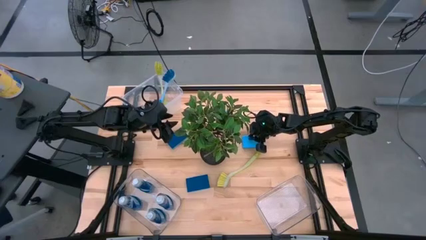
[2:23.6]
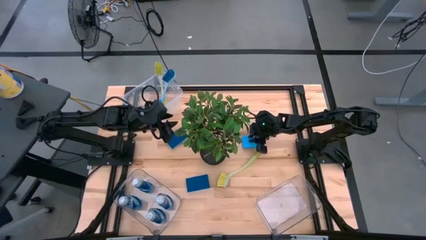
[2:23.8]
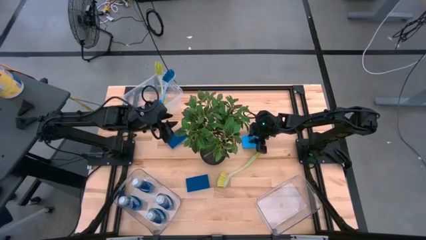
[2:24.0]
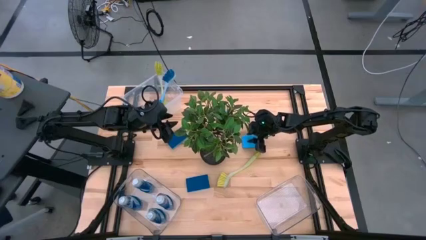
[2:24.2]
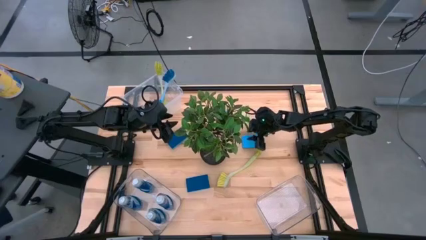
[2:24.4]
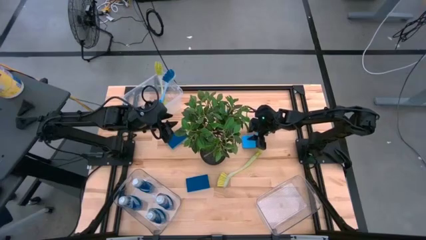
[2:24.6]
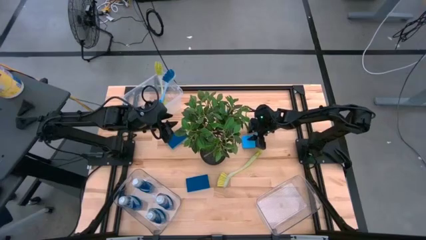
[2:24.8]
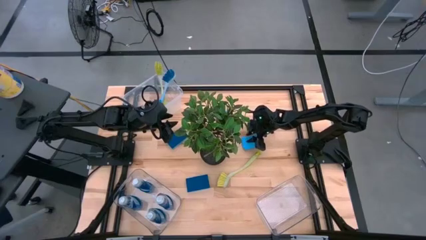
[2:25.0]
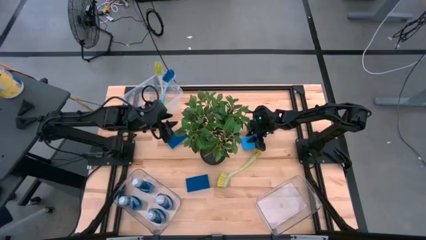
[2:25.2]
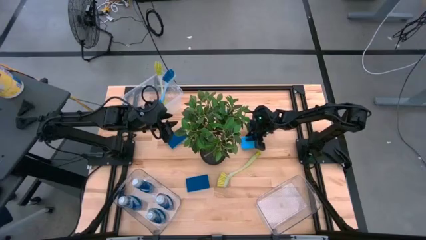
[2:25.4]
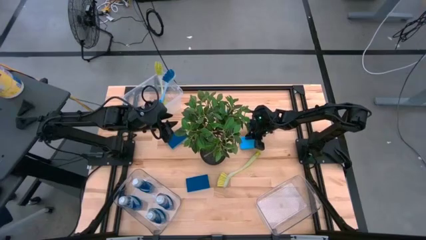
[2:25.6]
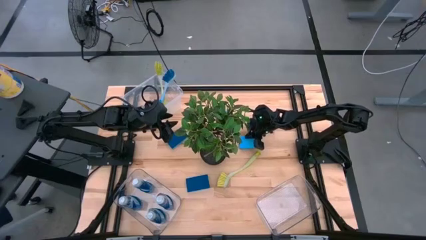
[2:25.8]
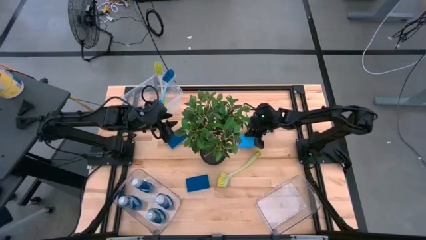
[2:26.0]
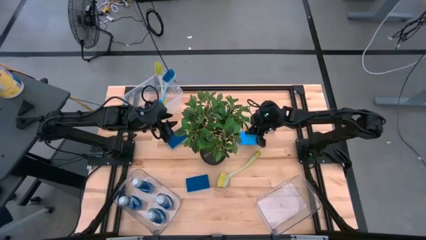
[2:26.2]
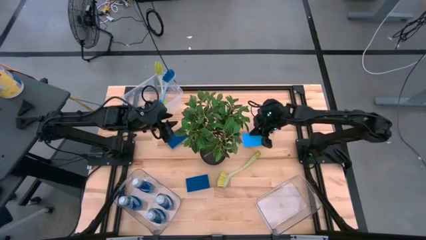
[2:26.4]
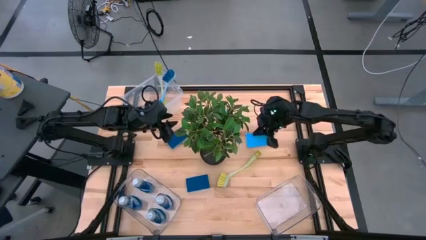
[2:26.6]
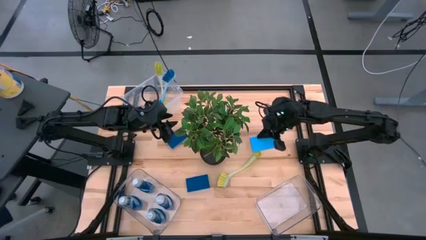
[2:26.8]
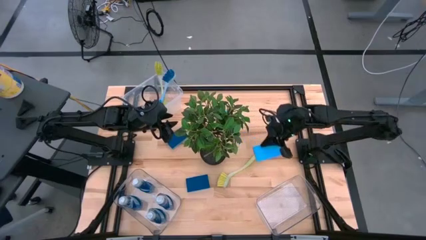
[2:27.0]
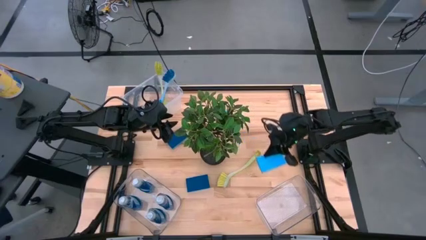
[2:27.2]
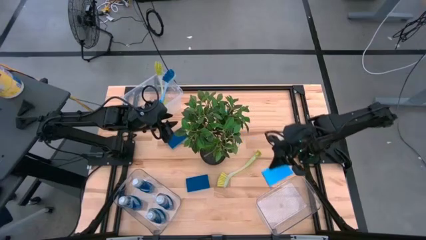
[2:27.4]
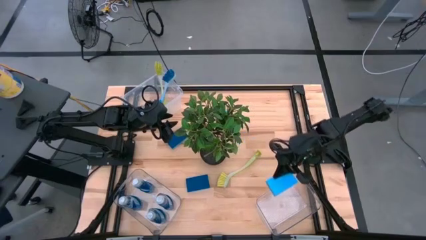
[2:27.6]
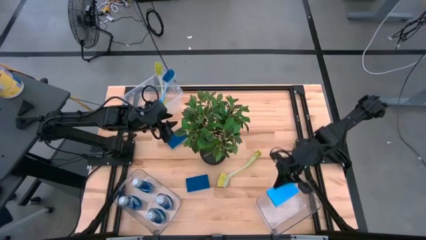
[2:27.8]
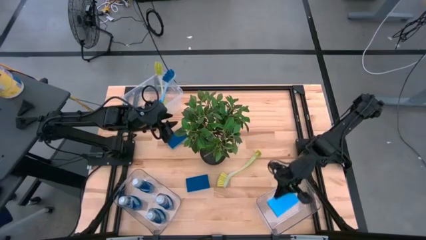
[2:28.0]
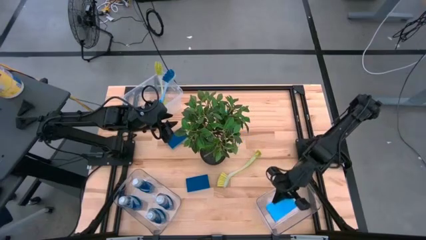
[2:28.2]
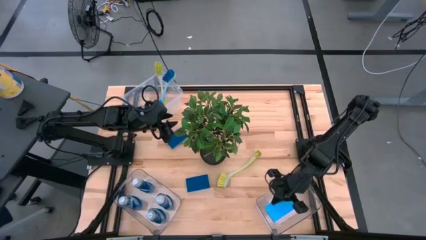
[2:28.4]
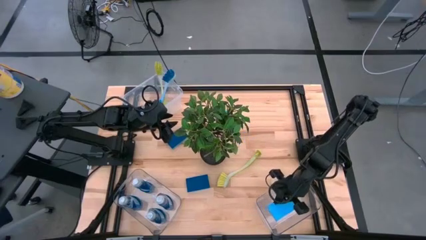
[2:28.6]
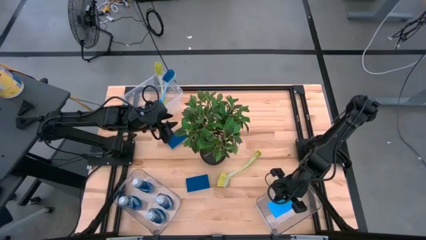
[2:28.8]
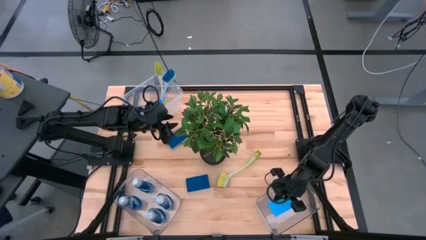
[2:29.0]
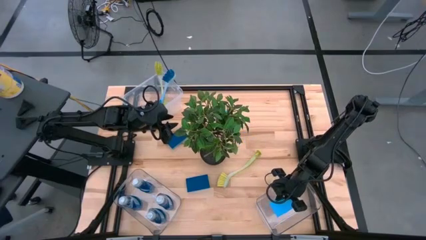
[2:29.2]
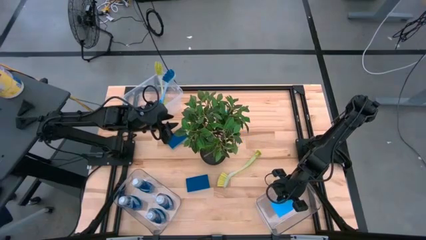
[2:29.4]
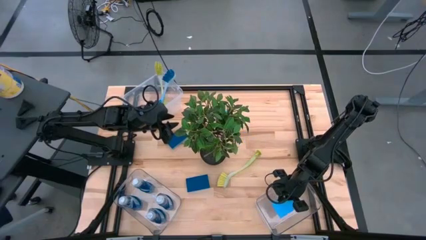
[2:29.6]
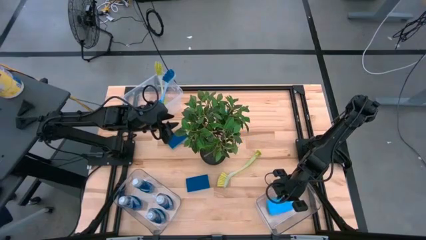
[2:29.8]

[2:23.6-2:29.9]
Task: Pick & Place Kitchen Sink Supplies
Put the blue sponge into the bottom right transparent bin

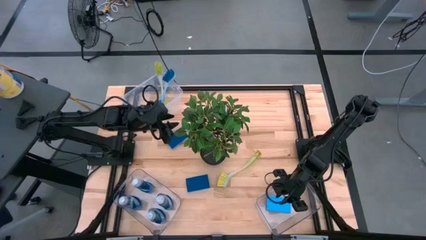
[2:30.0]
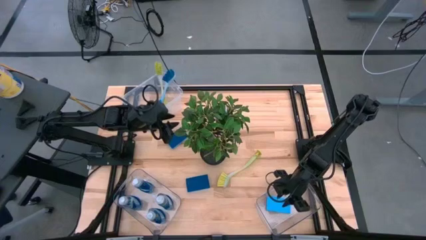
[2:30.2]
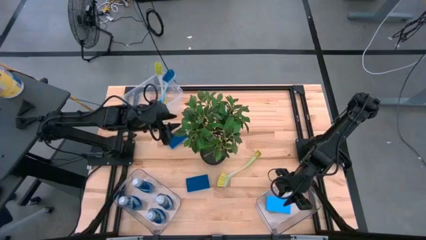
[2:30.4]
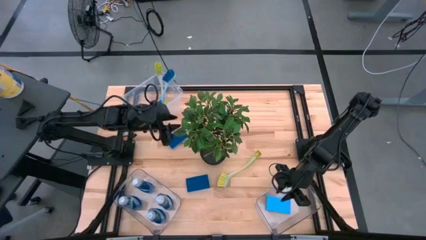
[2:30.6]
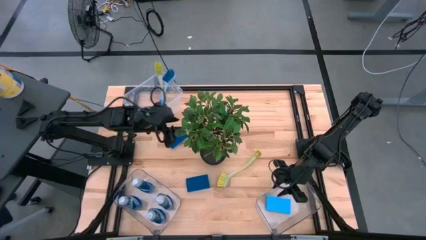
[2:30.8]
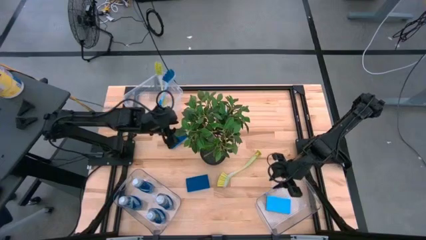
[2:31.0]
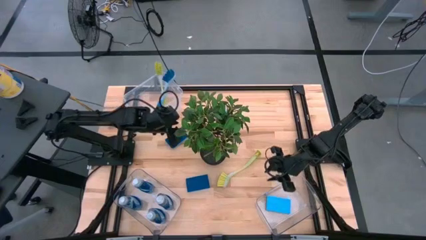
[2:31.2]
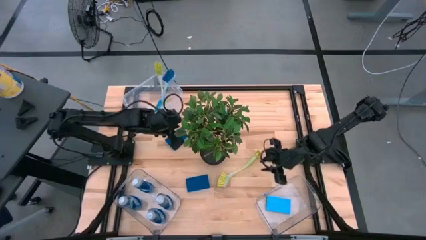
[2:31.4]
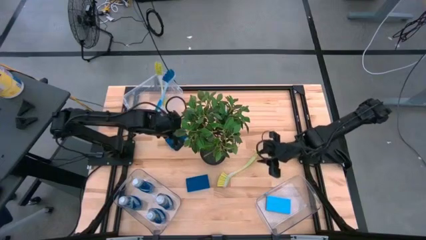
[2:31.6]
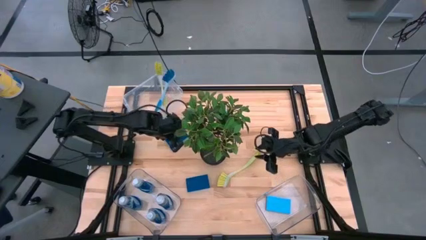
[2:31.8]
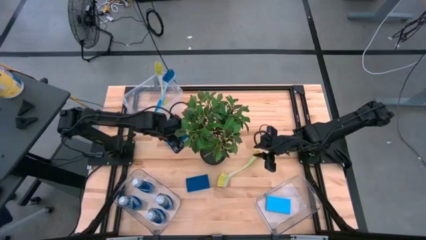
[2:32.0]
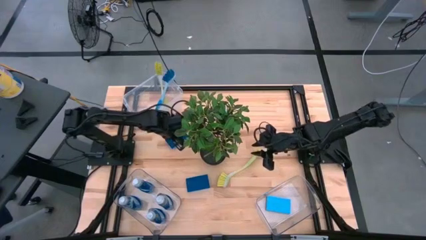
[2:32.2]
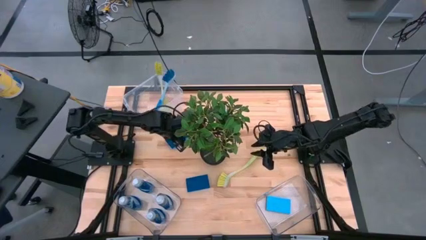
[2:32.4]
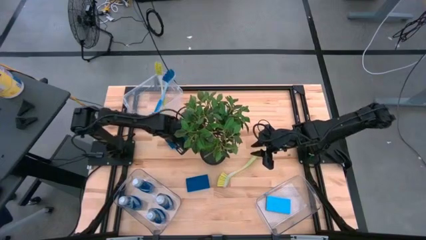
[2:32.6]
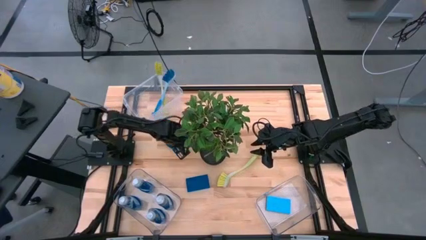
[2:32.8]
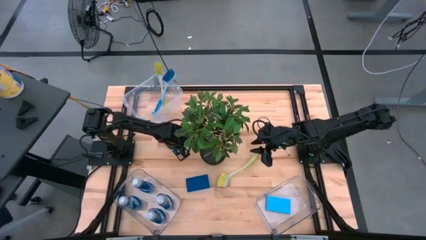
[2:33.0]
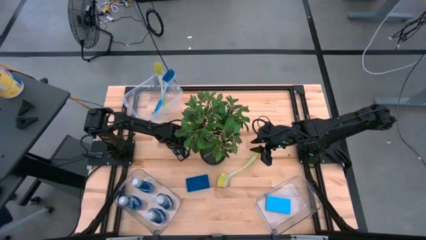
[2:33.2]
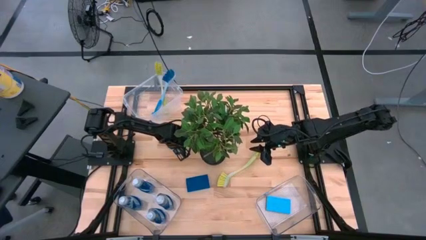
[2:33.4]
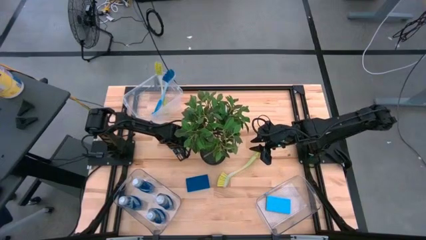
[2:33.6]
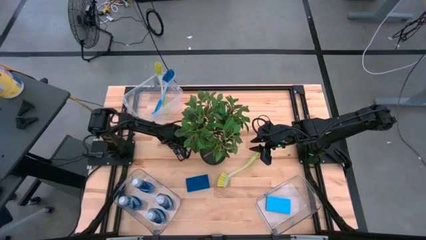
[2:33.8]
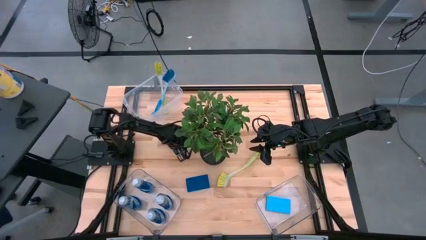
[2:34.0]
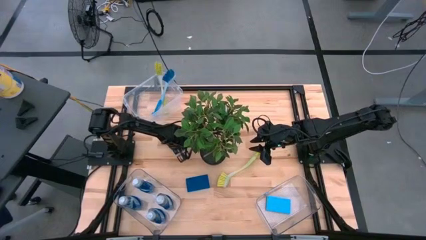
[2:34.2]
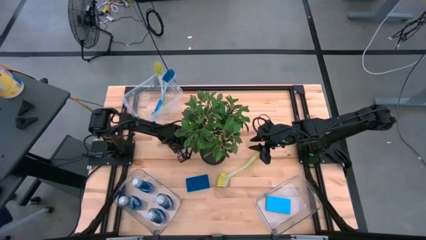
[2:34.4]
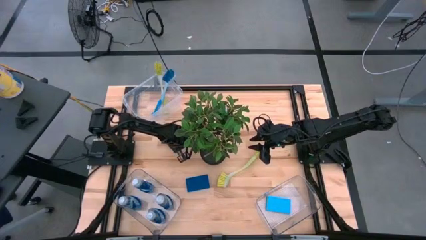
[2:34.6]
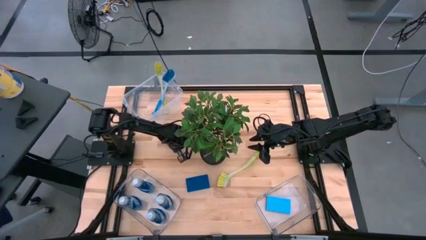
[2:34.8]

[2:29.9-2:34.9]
Put the blue sponge into the bottom right transparent bin

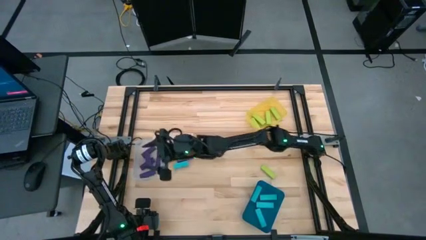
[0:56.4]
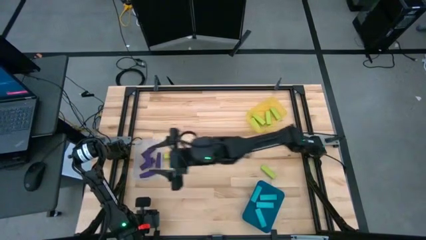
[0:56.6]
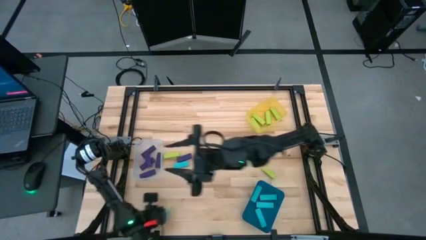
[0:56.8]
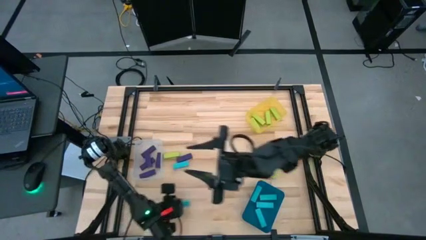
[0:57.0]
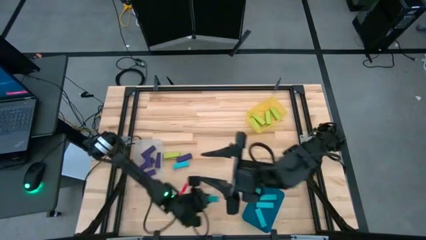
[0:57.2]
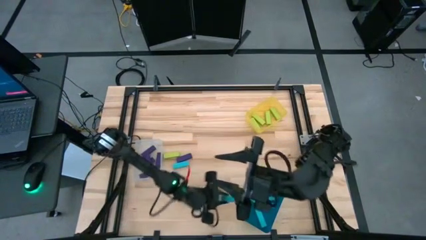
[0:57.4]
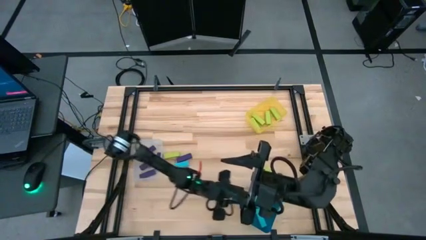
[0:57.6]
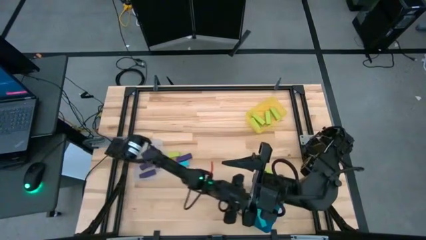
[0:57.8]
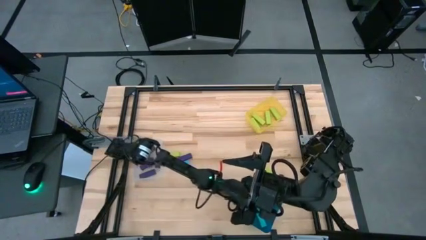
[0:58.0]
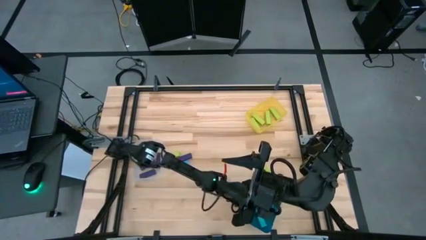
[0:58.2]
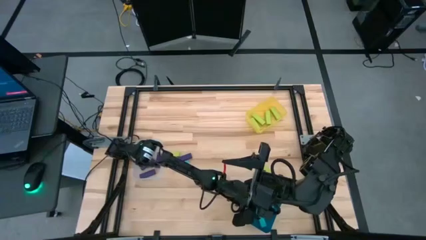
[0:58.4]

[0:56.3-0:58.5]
Task: Sort blocks
Put the light blue block into the blue bin

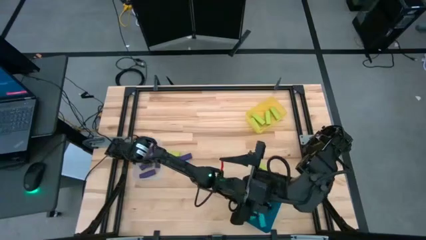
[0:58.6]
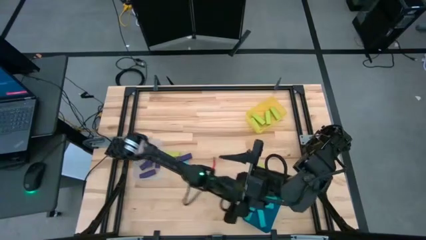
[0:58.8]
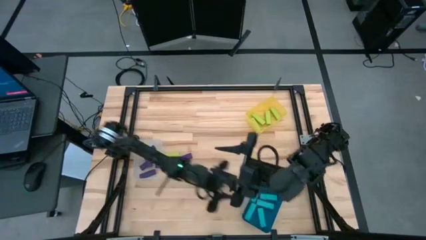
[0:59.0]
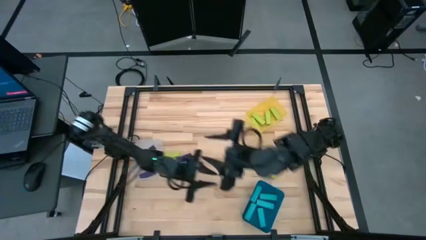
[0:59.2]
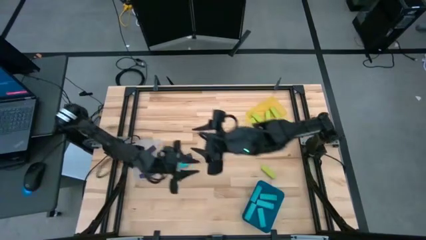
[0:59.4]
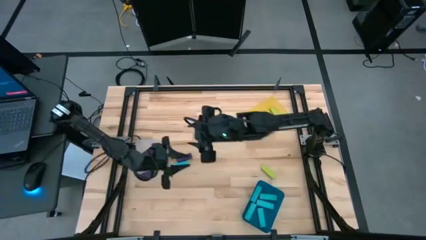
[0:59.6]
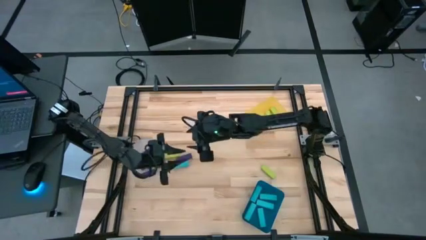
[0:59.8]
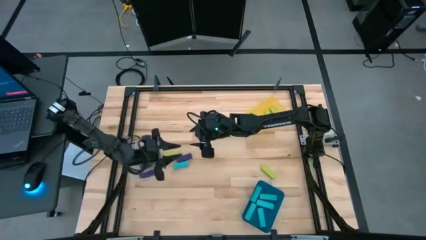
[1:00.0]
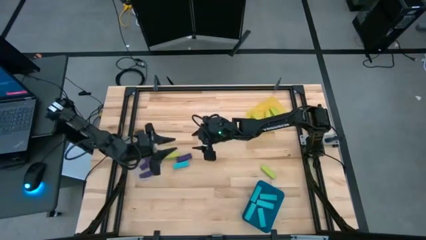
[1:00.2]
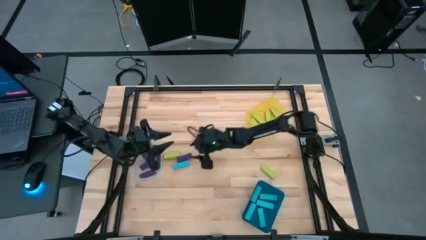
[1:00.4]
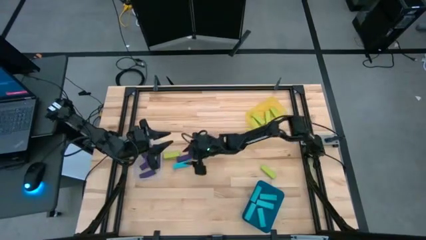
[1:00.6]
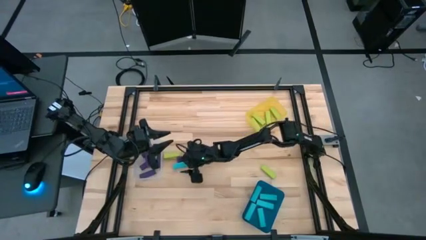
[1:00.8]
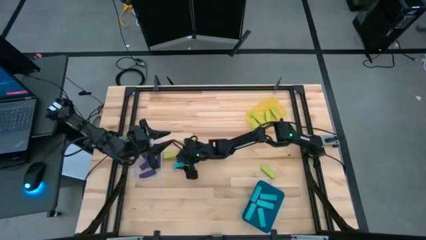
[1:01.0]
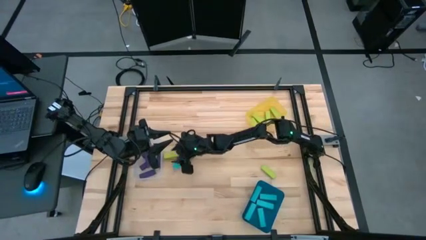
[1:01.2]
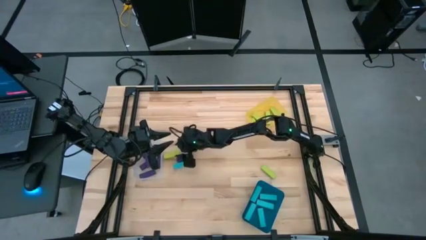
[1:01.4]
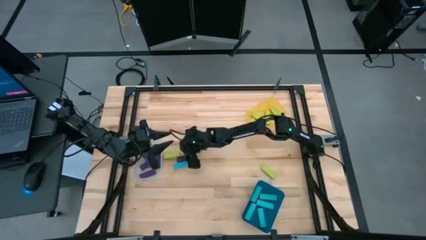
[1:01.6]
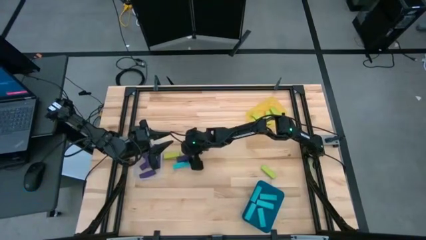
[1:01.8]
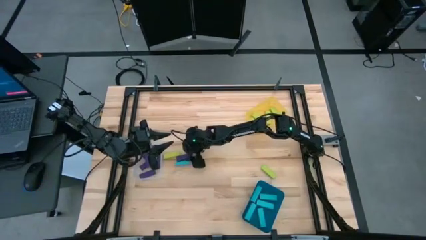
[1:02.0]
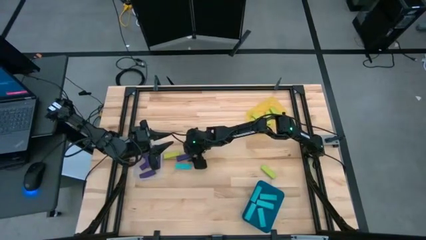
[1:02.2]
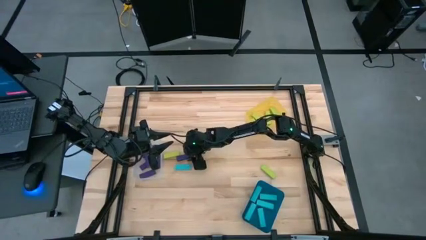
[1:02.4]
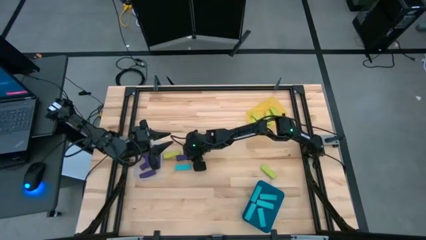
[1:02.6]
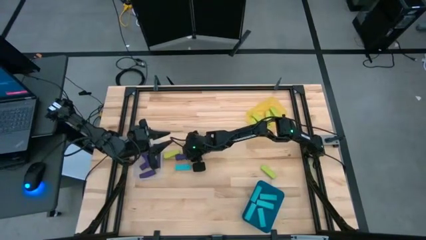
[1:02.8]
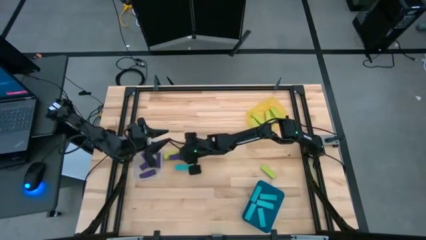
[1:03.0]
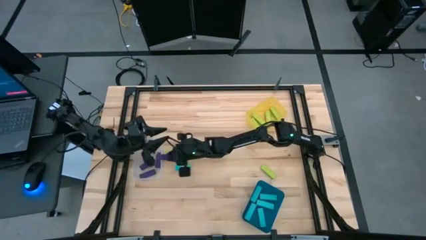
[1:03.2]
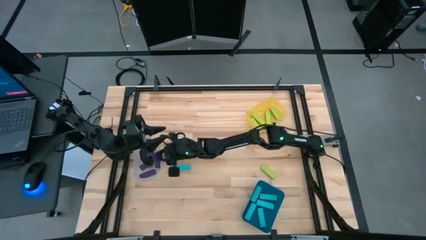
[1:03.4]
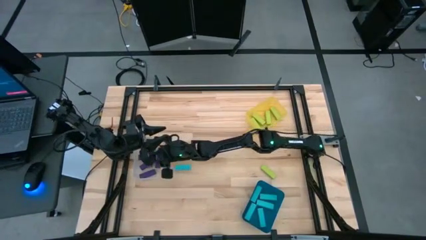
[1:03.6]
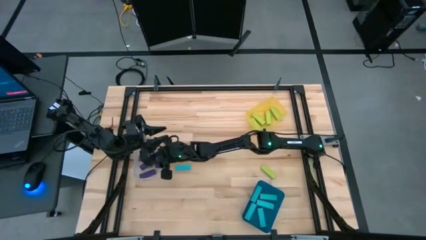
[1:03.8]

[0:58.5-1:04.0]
Put the violet block into the transparent bin
